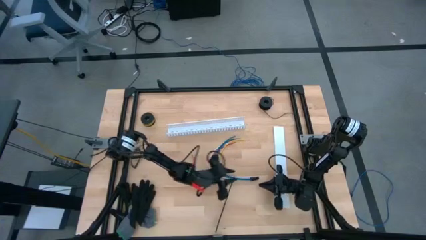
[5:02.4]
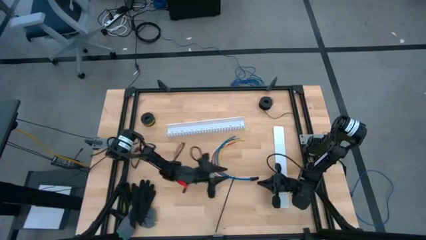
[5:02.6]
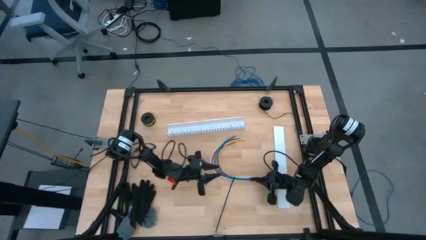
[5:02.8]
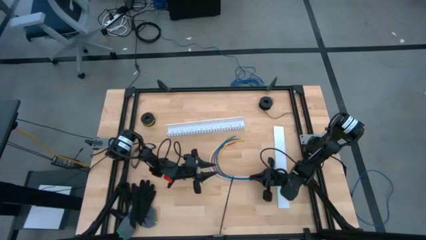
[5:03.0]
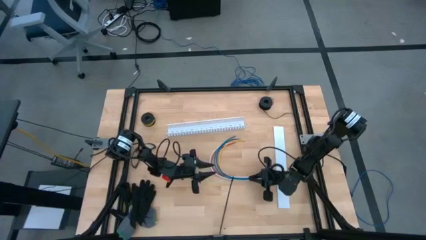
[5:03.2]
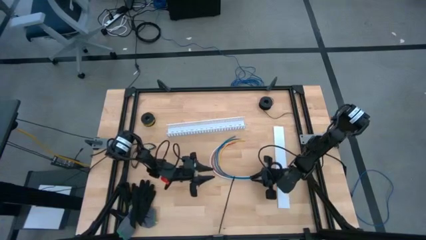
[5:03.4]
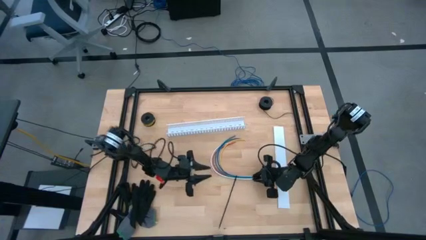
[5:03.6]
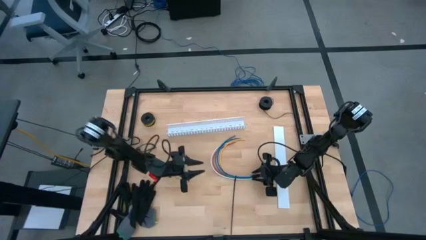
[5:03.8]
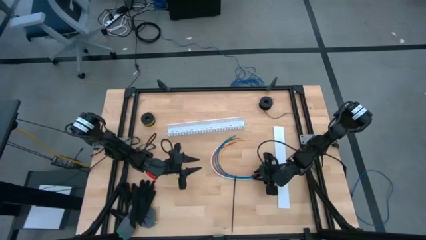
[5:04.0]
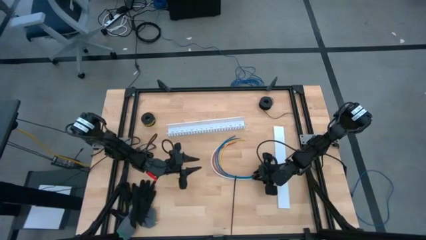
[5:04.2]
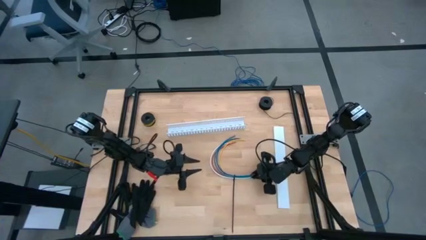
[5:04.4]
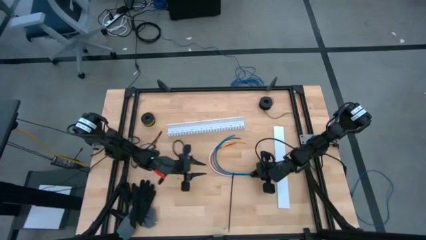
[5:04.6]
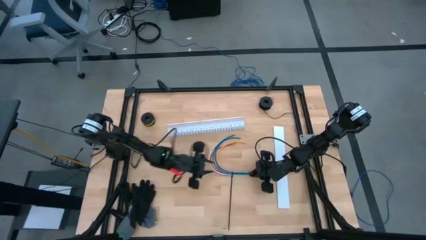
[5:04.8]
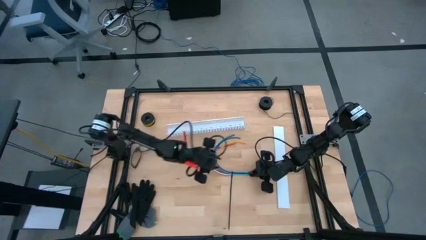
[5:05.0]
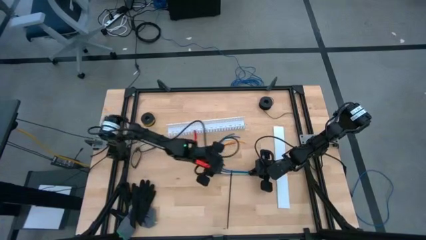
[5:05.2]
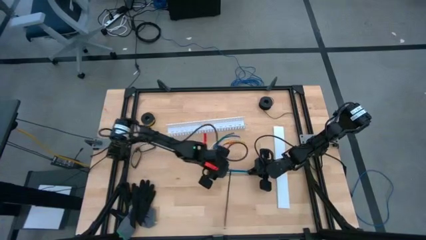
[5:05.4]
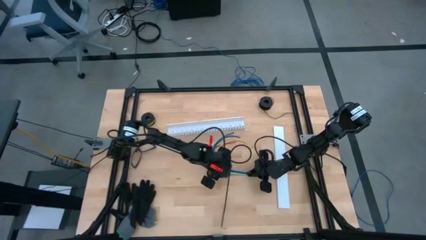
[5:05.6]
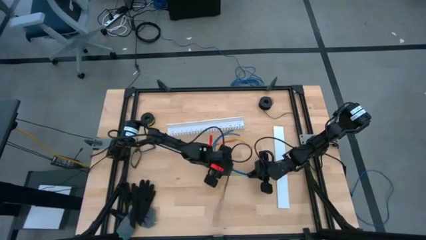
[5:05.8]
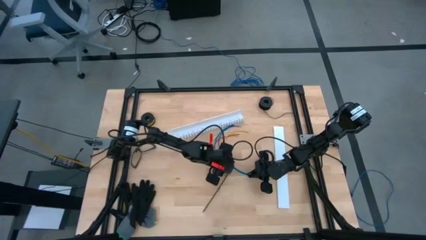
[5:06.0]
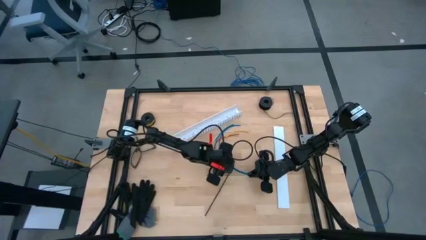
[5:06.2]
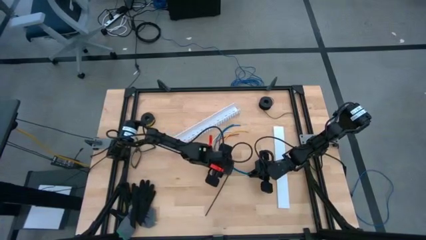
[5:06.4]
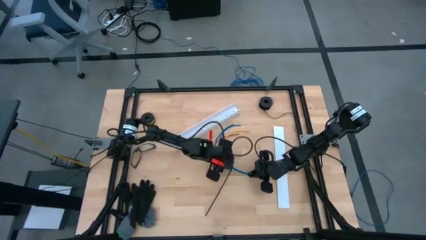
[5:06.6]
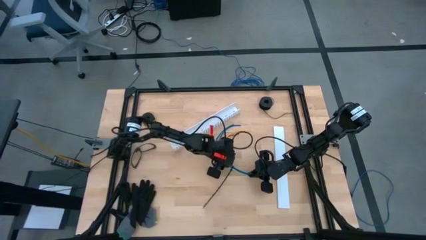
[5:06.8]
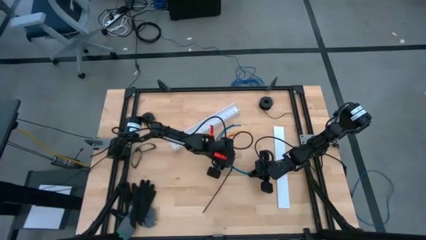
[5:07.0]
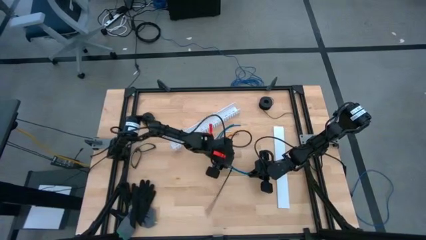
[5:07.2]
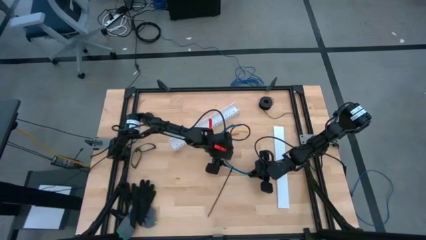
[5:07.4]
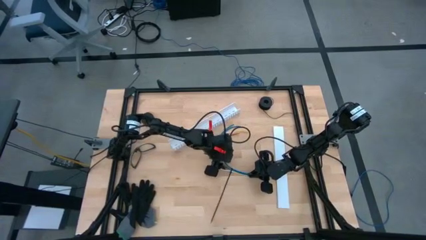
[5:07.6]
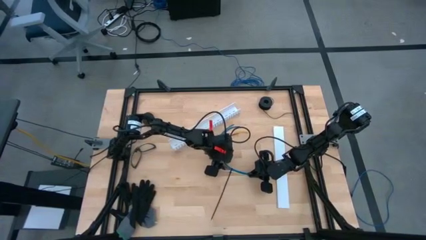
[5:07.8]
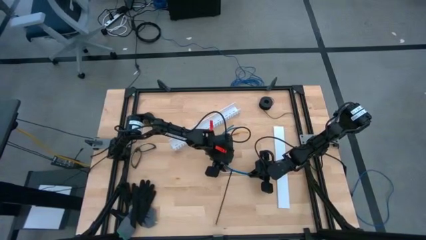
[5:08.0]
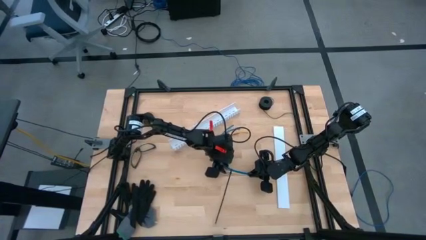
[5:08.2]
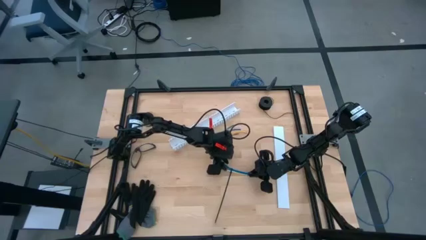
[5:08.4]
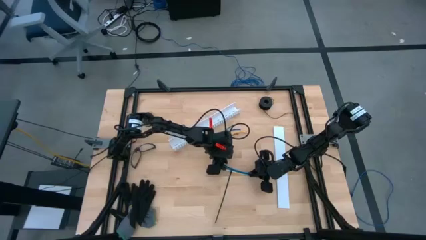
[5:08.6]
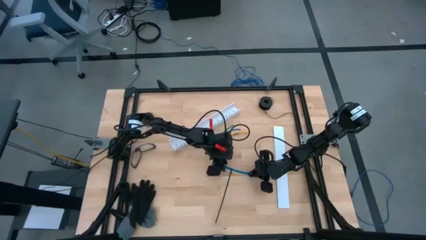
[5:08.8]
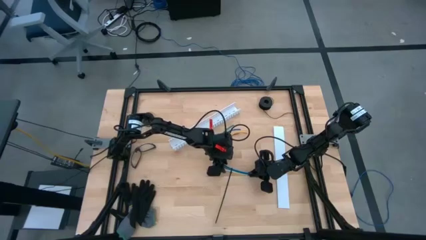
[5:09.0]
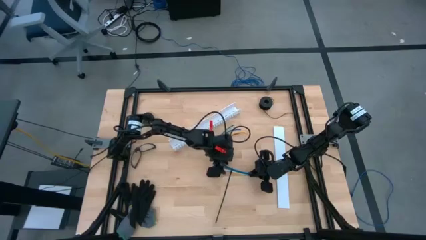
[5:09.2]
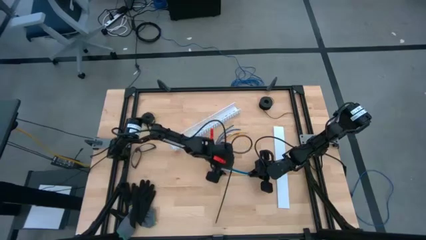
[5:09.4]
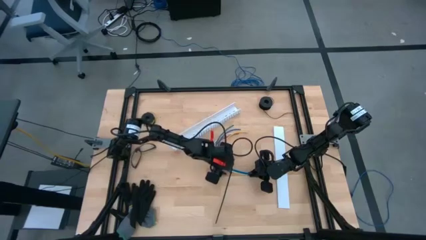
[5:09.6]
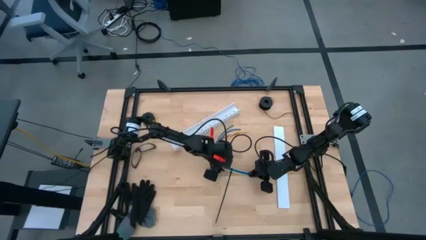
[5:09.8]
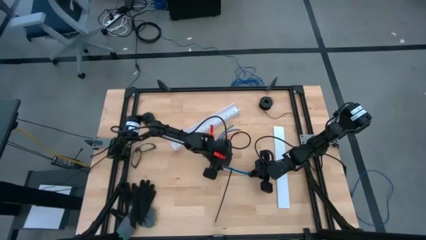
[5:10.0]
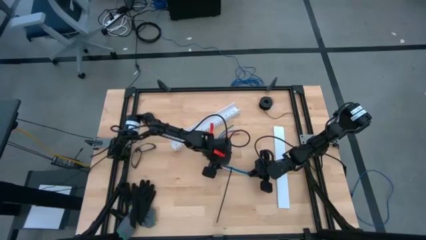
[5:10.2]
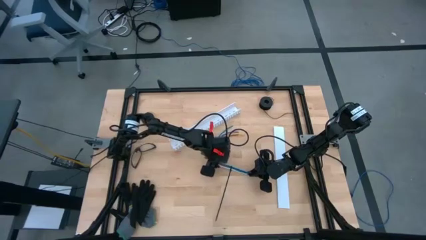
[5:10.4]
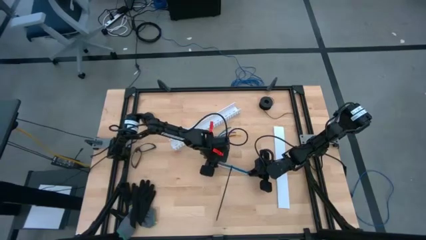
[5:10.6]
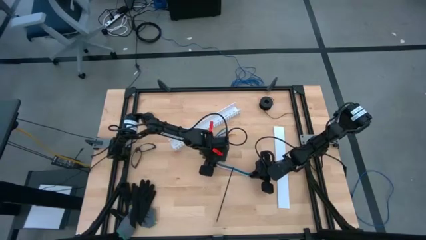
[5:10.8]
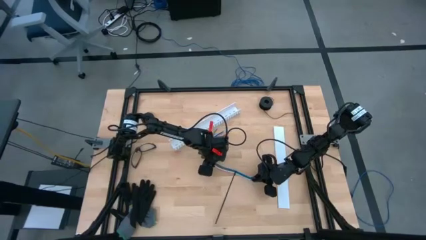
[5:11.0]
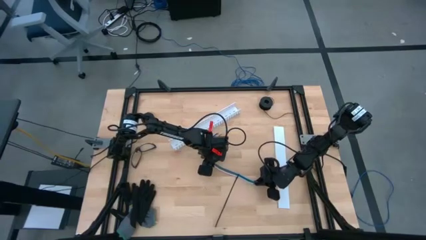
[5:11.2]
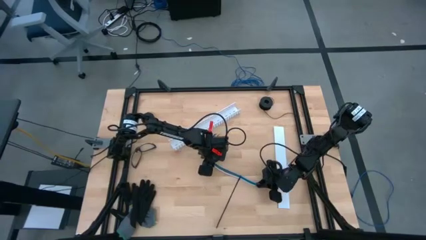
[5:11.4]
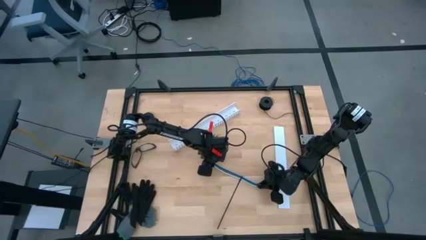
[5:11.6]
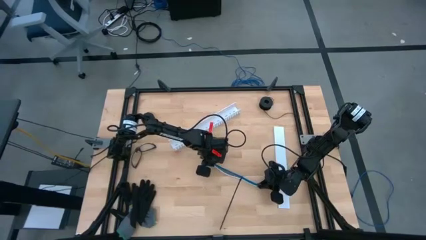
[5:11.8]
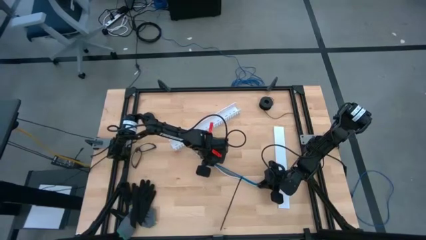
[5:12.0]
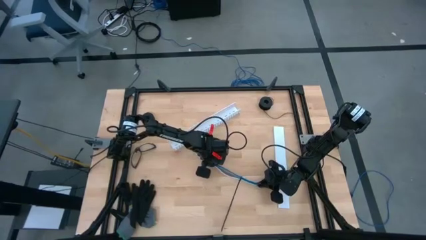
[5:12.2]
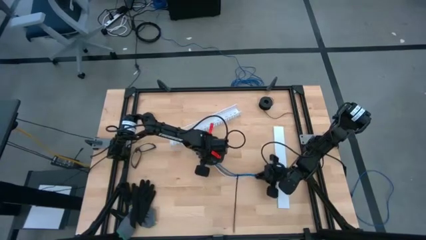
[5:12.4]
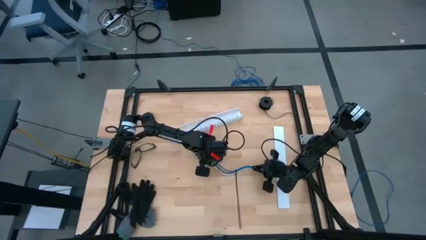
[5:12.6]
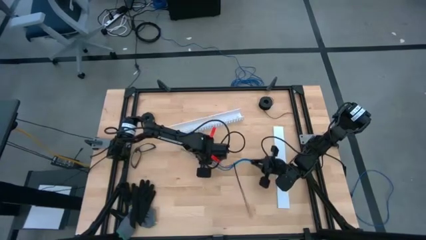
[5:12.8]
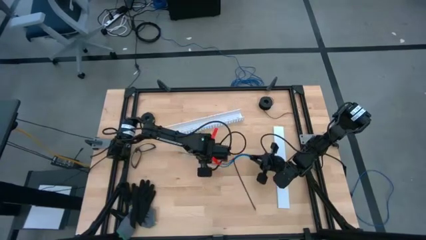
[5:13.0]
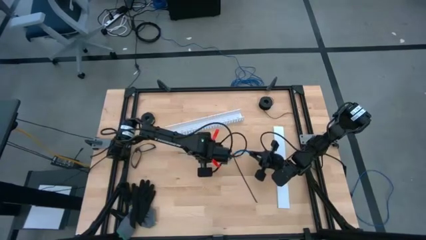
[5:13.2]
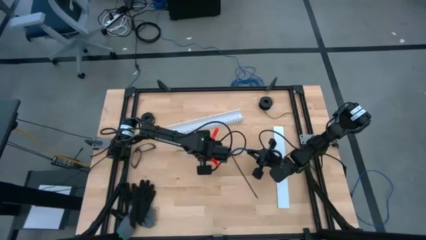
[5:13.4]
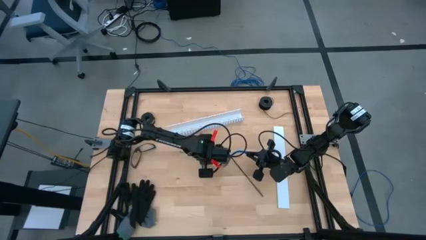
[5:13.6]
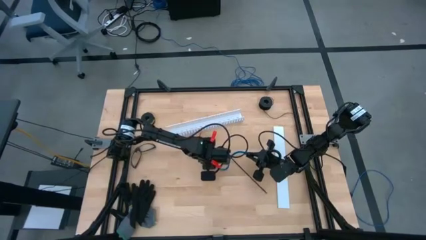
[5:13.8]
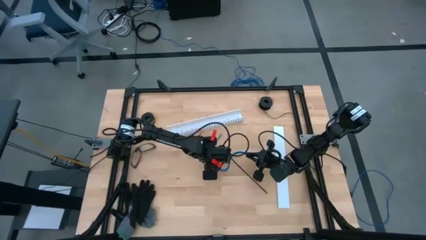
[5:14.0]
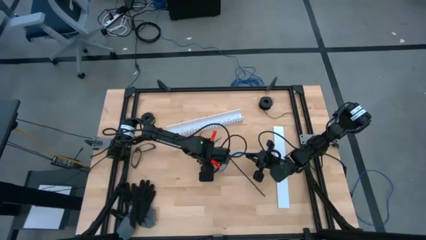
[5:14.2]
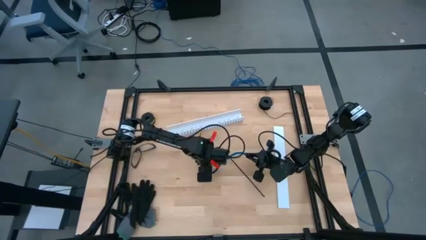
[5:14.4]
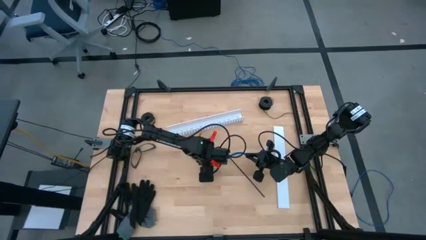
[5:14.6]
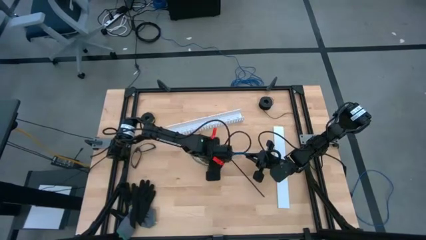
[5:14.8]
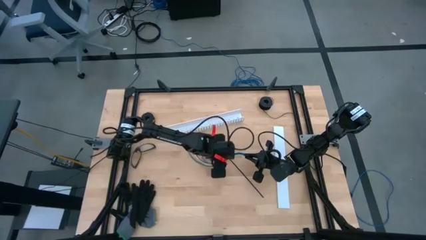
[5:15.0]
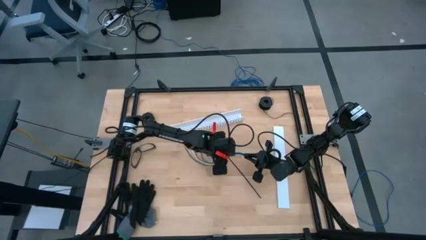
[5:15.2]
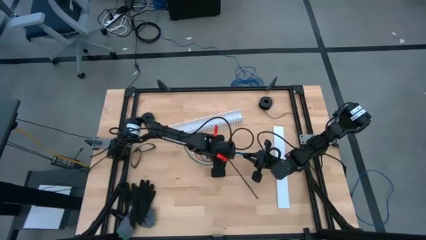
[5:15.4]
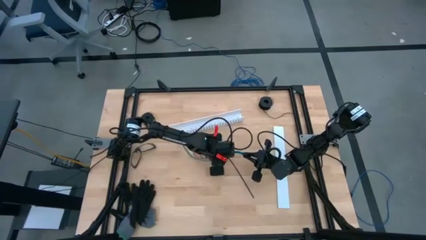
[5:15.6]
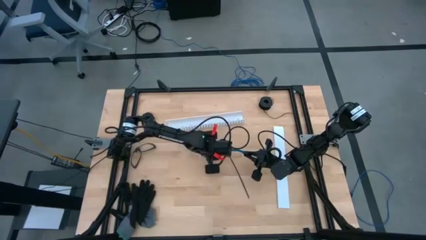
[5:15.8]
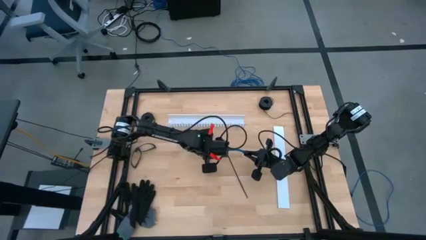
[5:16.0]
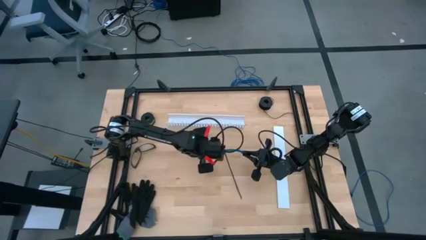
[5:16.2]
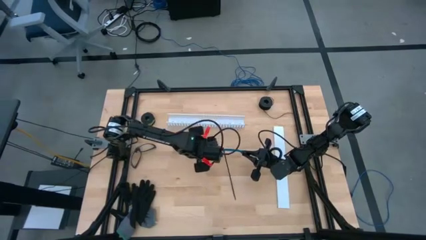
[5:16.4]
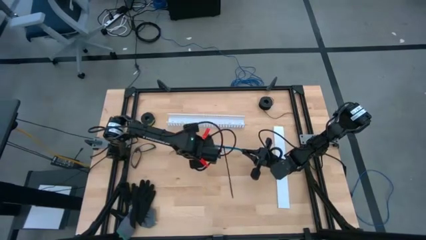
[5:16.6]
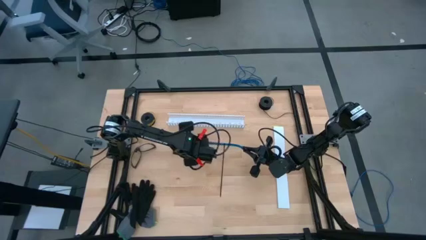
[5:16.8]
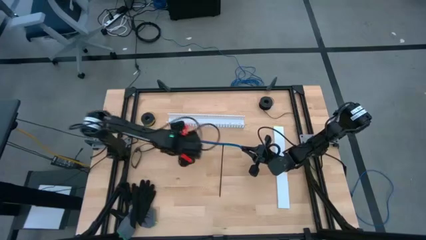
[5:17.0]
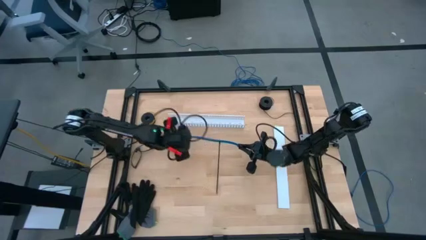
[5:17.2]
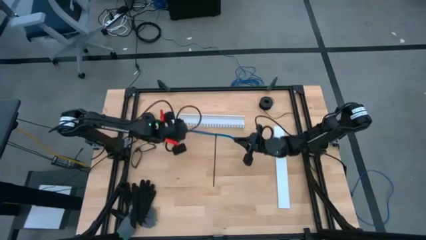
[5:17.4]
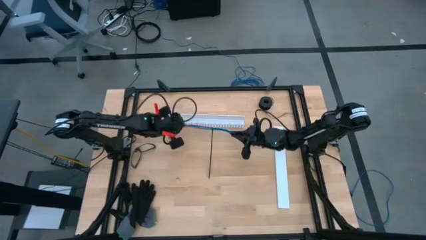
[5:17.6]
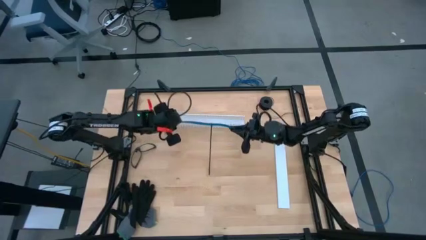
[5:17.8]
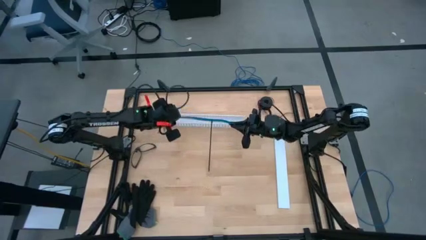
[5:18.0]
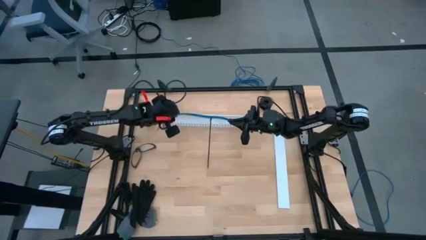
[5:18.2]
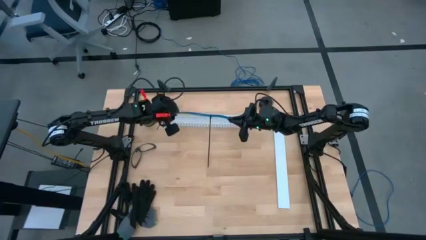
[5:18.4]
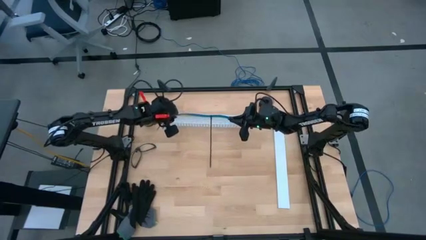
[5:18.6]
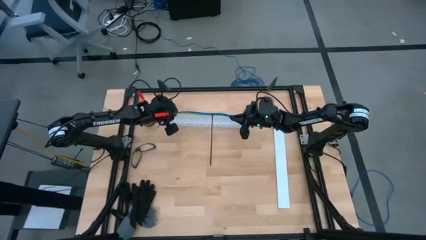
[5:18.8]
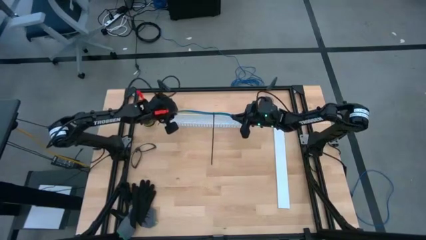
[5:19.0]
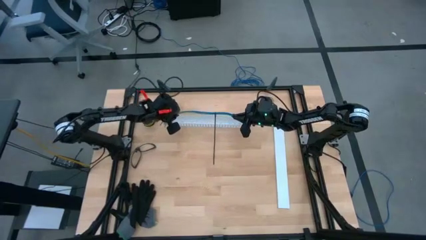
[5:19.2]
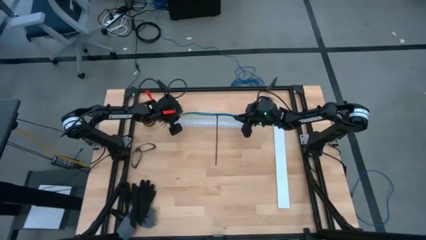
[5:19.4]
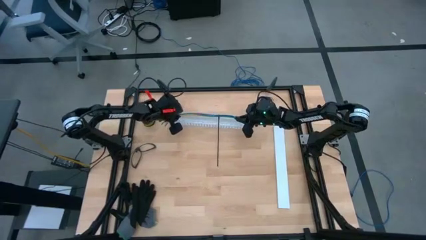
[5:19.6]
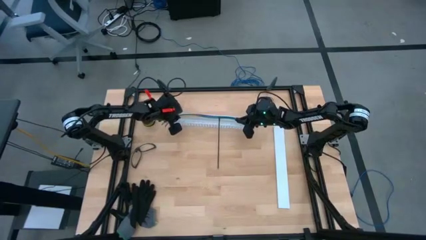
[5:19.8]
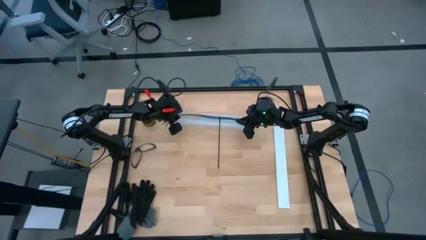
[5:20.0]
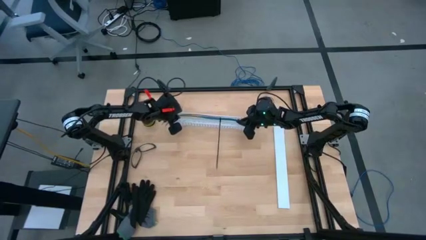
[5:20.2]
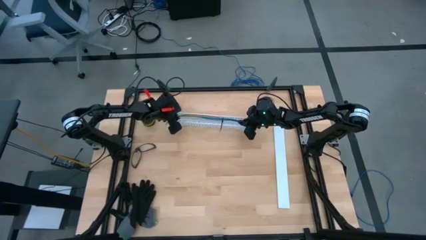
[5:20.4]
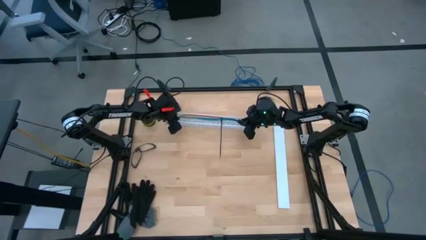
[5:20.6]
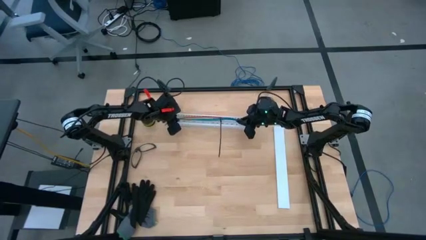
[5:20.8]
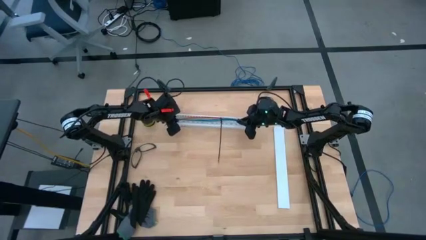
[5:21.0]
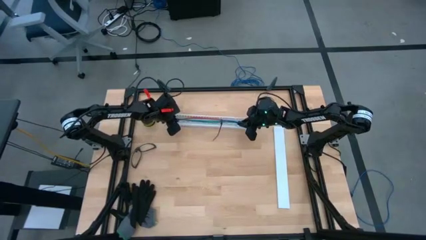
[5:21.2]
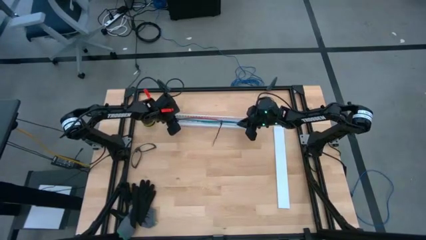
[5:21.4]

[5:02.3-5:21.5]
Task: Ziptie cables
Put the zip tie cable into the white cable duct
